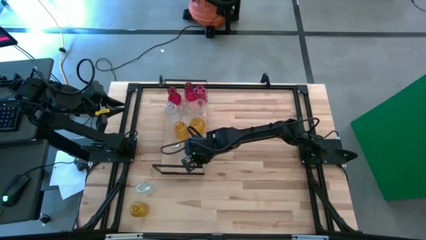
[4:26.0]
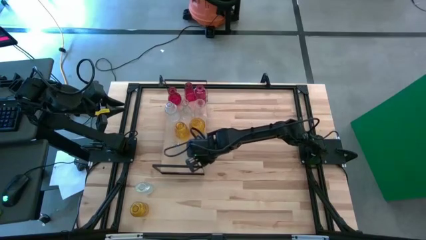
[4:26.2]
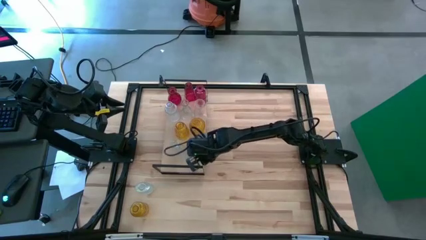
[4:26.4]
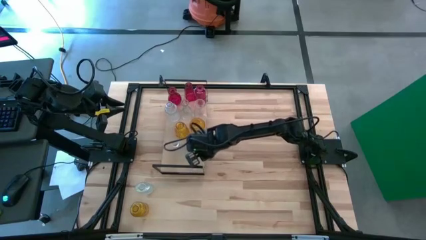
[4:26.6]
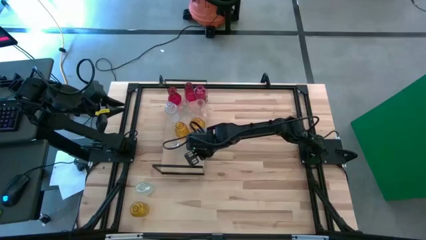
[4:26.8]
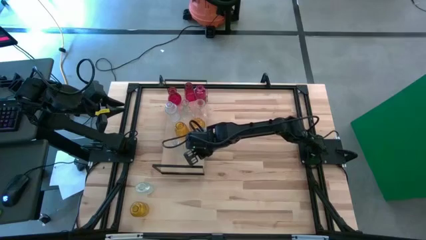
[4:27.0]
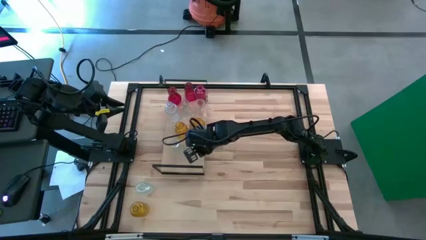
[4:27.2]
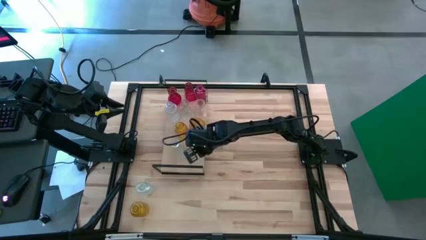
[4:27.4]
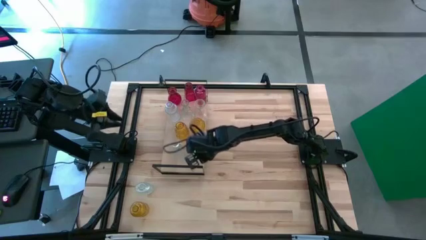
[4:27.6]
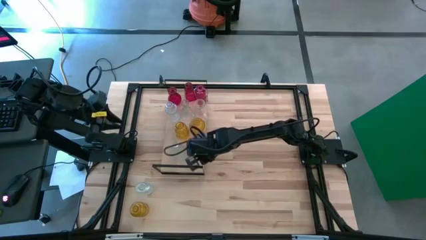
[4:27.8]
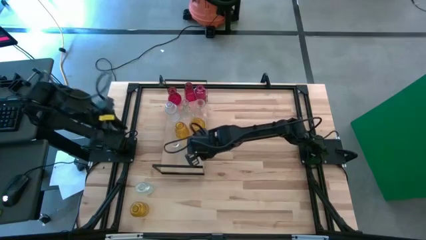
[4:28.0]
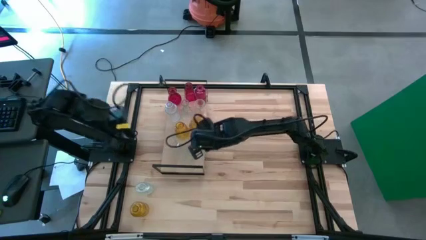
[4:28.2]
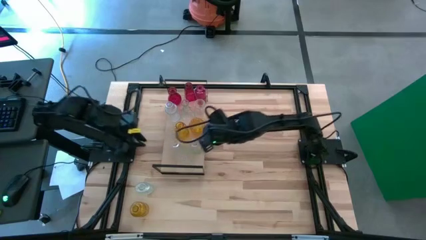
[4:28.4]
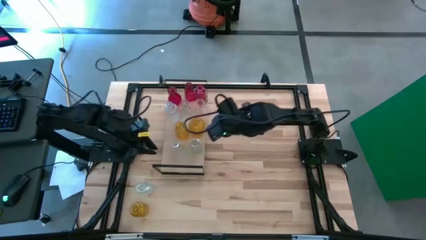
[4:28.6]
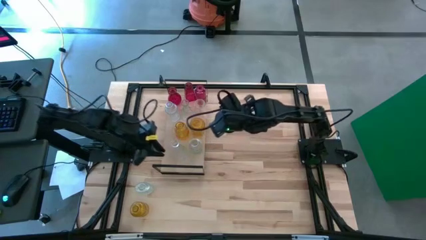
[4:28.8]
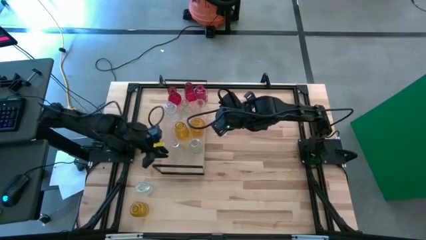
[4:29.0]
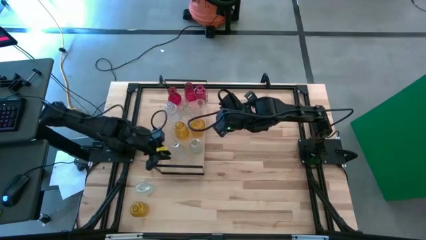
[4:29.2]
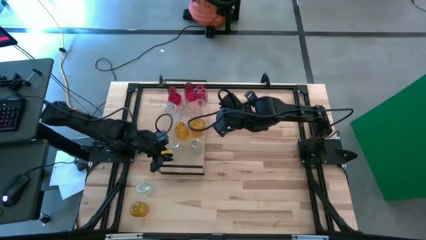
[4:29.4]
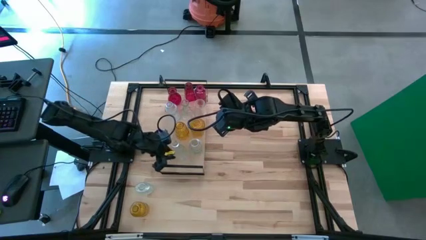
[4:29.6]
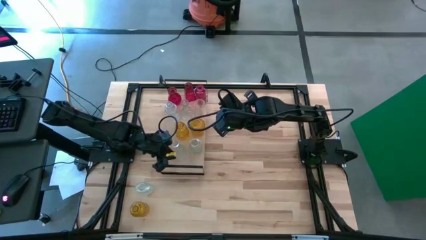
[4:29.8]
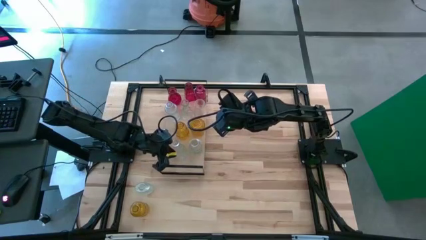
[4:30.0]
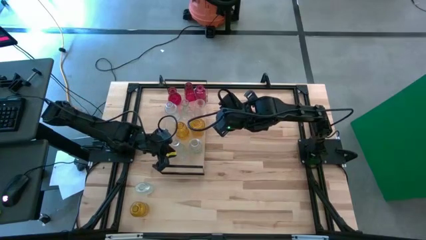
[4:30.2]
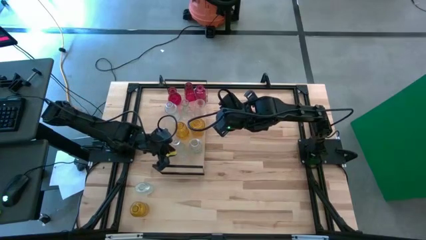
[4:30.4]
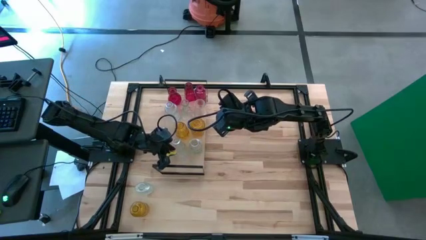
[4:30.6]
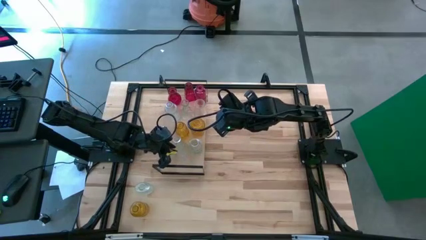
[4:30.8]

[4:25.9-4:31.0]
Task: sort vases onto shelf
Adjust the transparent vase on the shelf

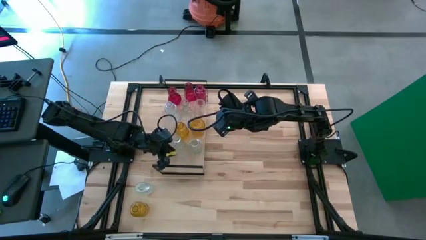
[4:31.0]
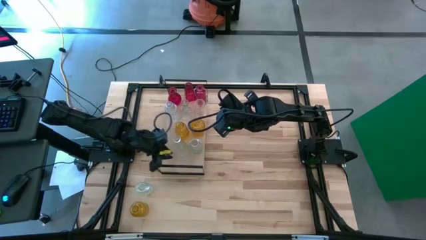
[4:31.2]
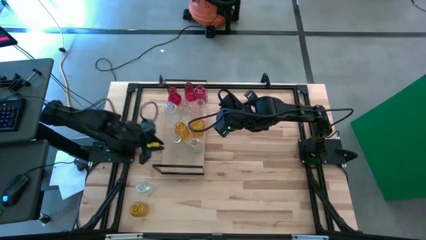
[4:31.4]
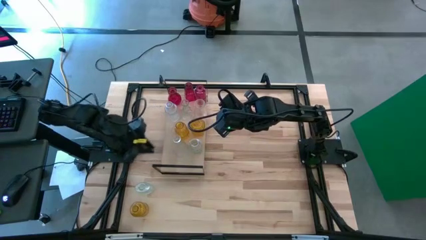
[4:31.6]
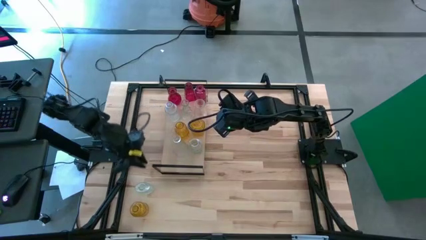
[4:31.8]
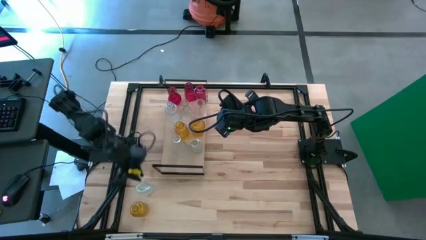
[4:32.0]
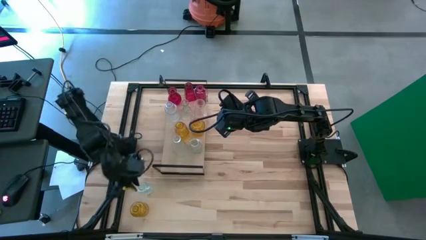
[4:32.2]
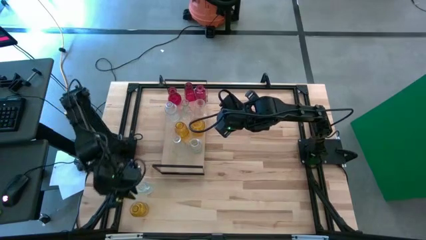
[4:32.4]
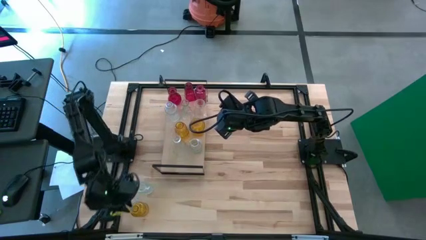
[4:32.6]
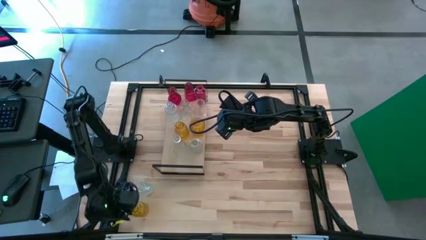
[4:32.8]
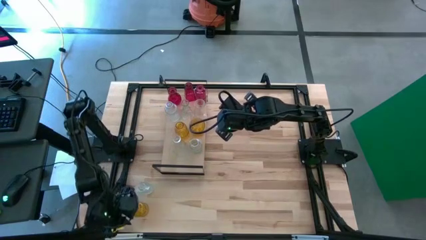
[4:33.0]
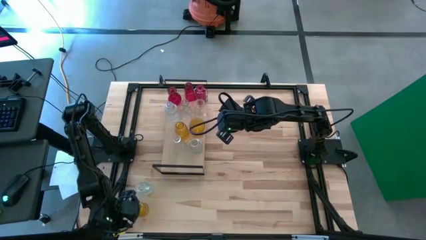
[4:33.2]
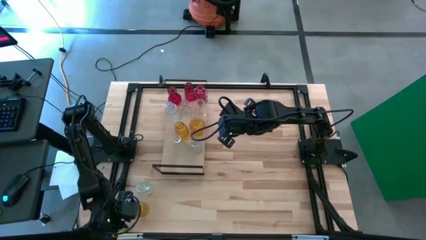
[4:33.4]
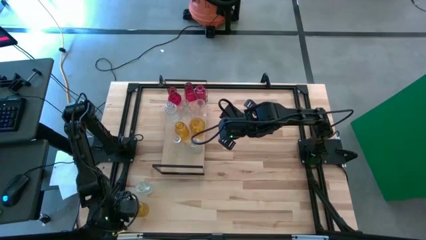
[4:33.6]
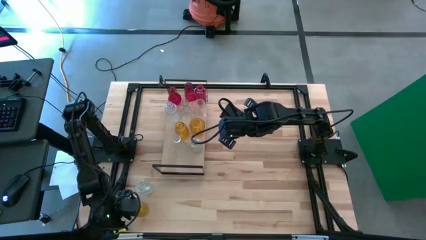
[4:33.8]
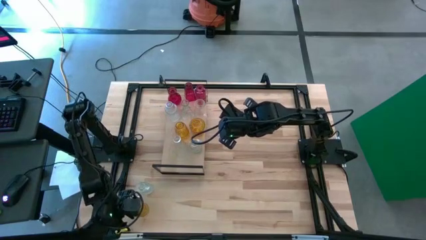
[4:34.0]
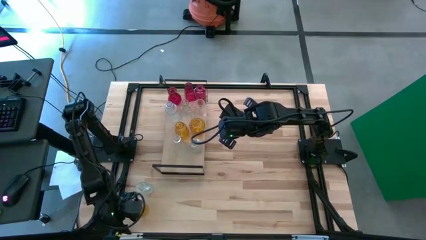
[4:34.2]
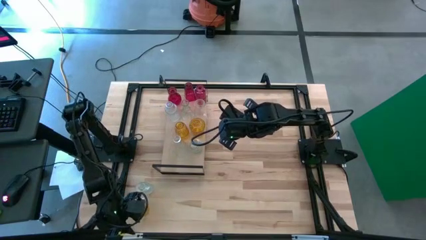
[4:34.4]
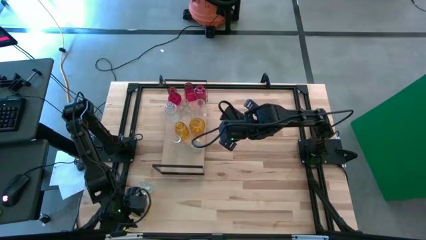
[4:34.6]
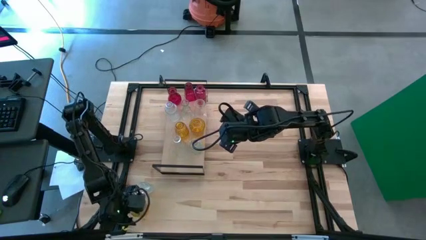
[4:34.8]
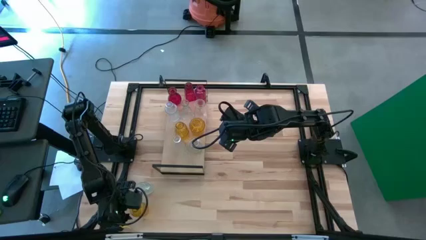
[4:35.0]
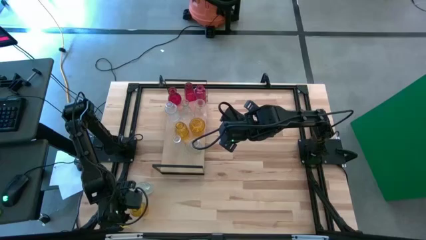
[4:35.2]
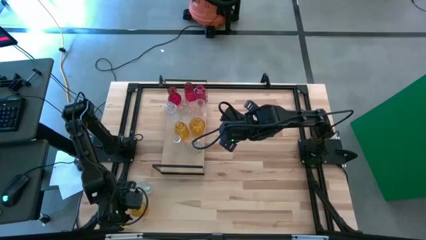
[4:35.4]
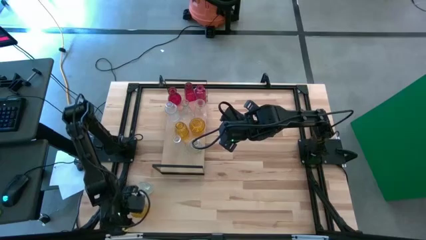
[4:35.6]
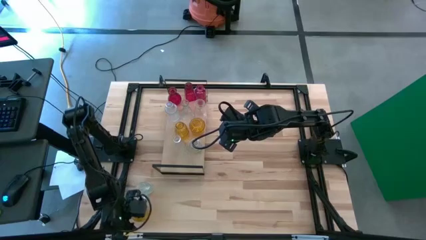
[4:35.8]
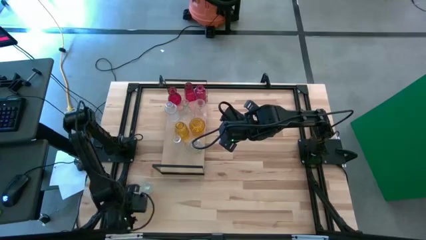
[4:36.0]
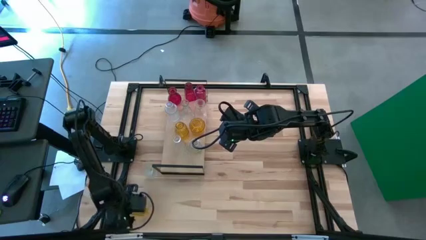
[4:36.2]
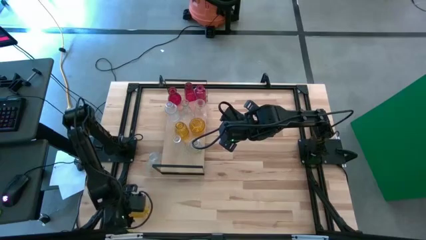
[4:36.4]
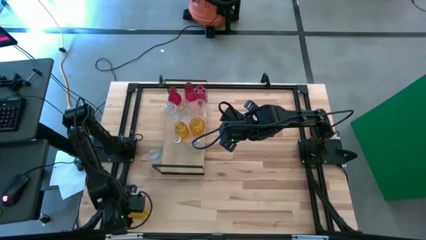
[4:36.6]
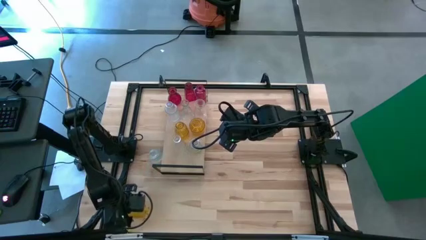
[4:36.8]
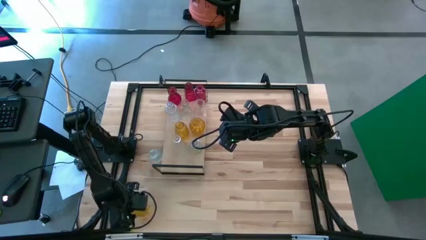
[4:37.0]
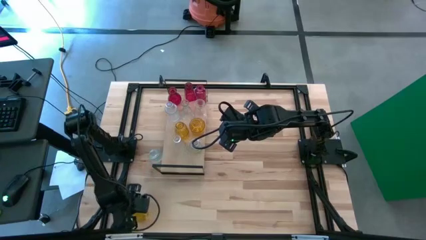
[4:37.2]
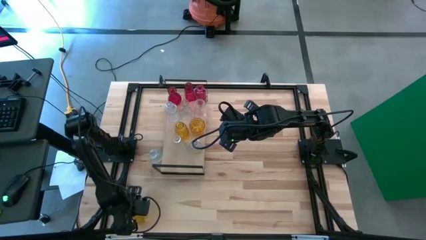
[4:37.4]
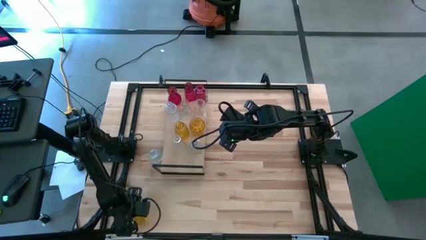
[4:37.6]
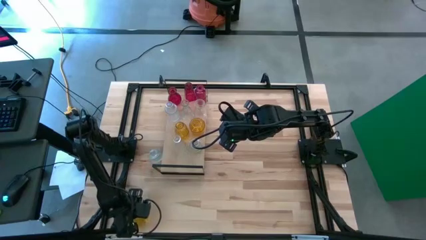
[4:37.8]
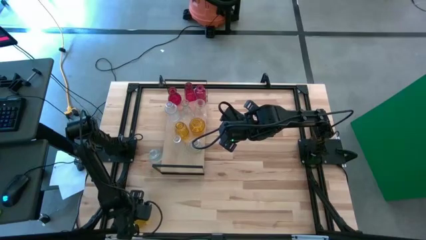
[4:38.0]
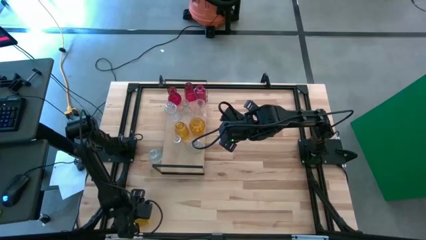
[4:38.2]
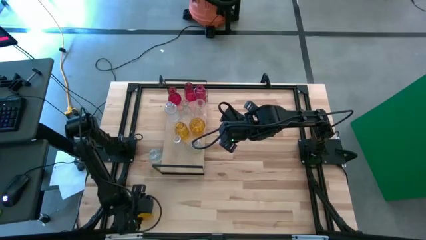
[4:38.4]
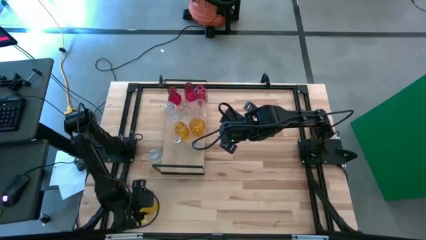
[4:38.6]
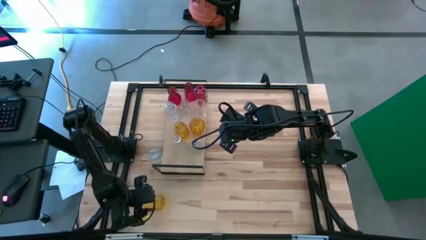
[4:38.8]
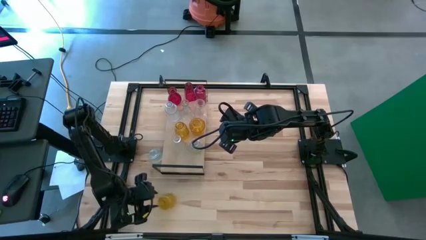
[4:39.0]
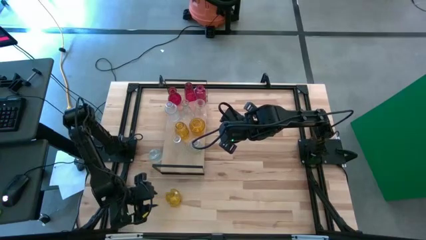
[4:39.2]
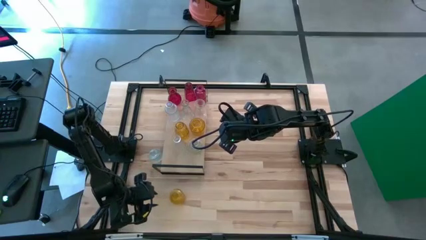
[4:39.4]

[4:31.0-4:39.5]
Put the yellow vase on the shelf aligned with the other yellow vase
